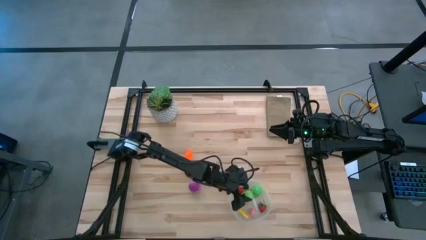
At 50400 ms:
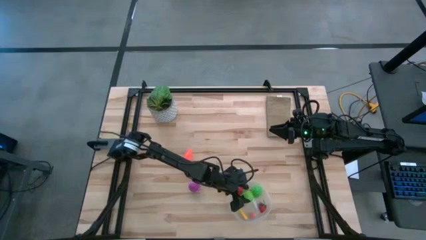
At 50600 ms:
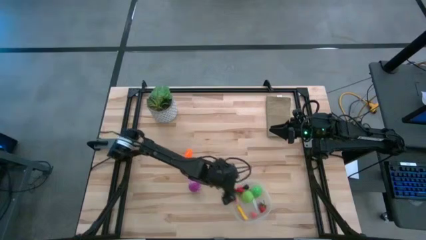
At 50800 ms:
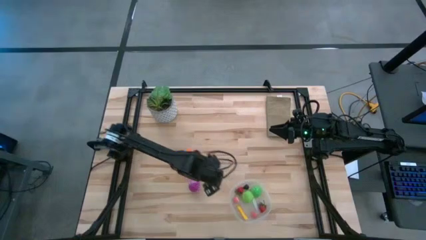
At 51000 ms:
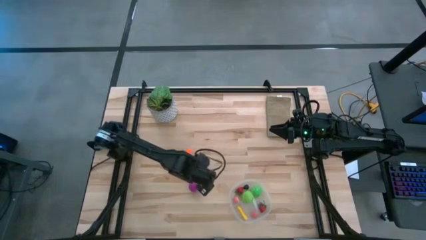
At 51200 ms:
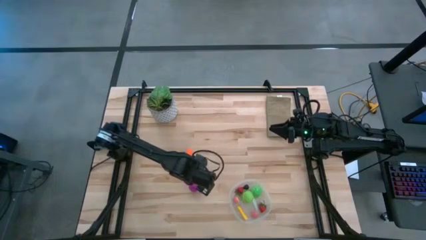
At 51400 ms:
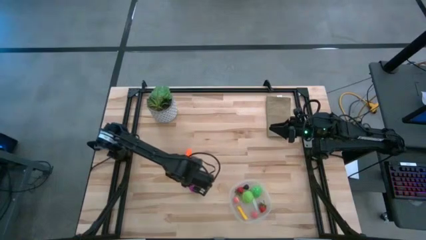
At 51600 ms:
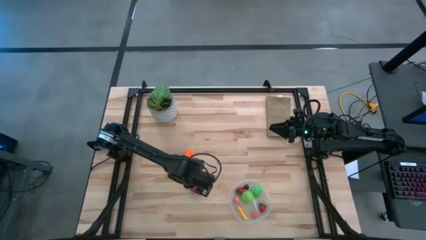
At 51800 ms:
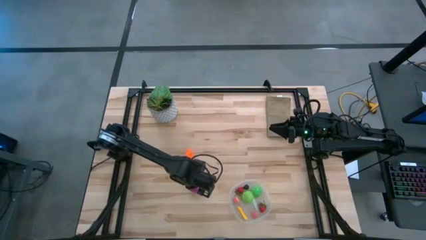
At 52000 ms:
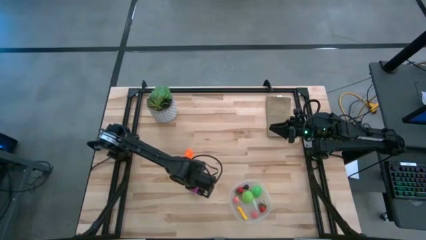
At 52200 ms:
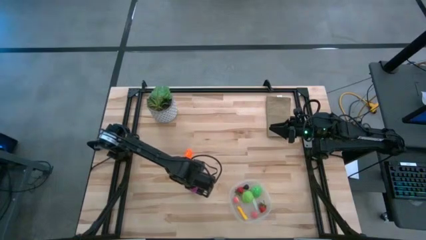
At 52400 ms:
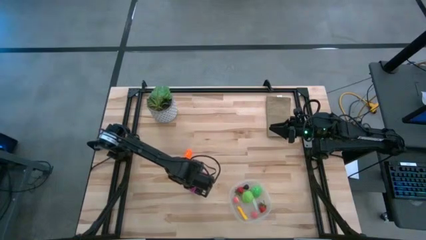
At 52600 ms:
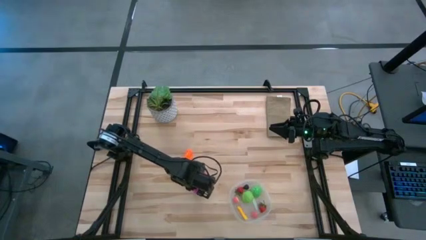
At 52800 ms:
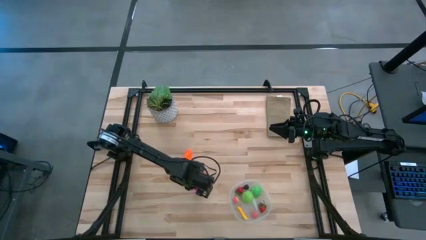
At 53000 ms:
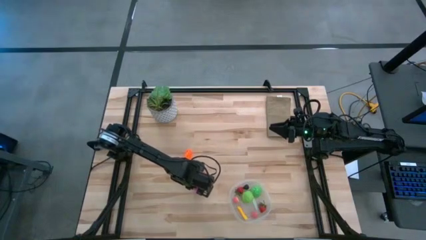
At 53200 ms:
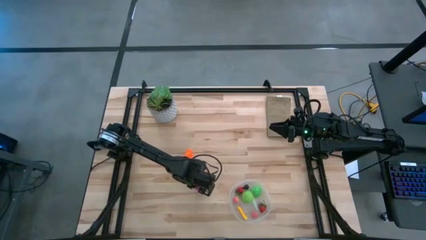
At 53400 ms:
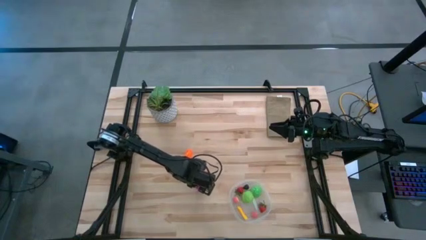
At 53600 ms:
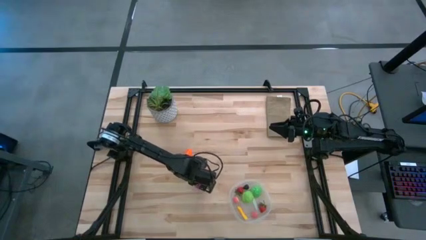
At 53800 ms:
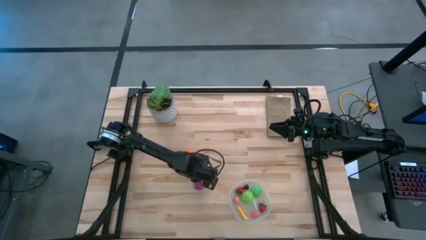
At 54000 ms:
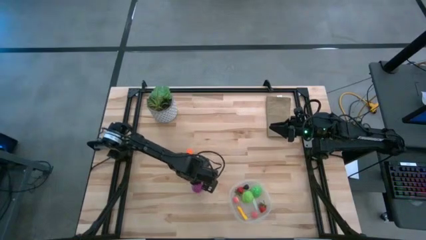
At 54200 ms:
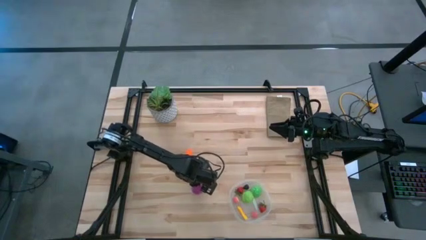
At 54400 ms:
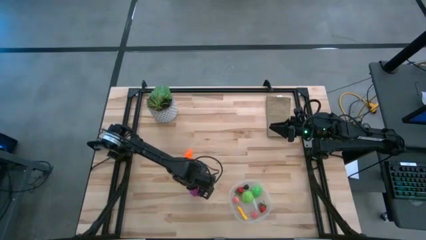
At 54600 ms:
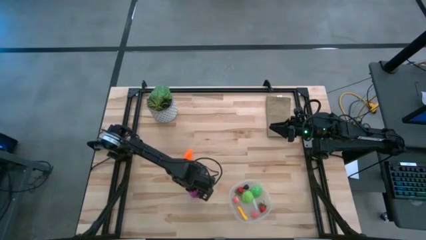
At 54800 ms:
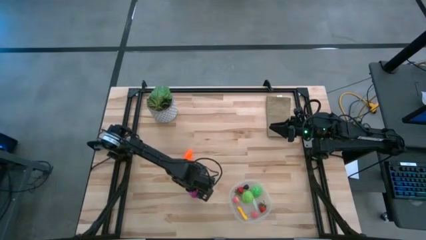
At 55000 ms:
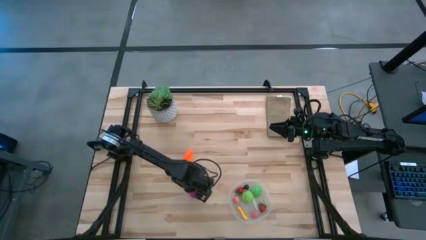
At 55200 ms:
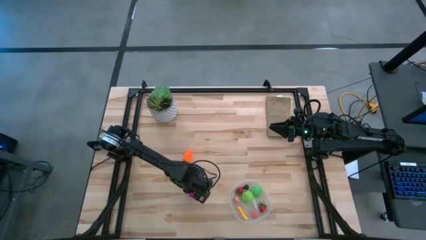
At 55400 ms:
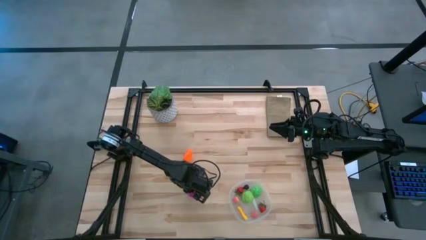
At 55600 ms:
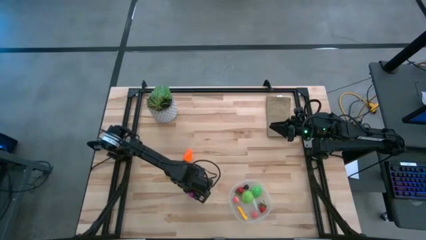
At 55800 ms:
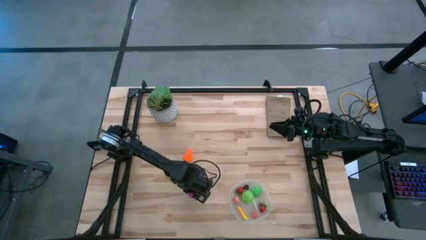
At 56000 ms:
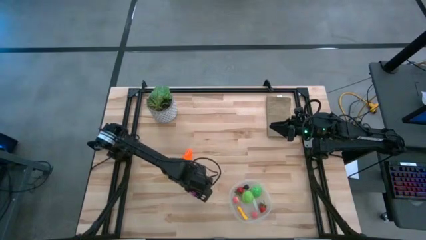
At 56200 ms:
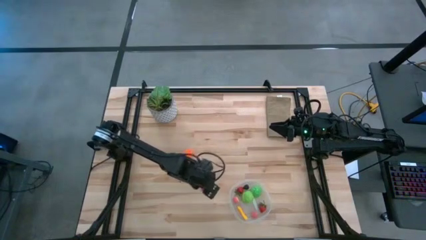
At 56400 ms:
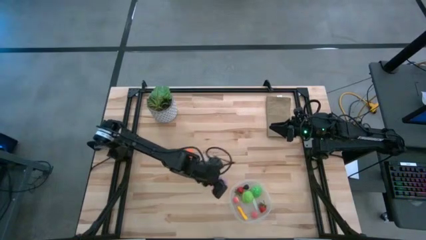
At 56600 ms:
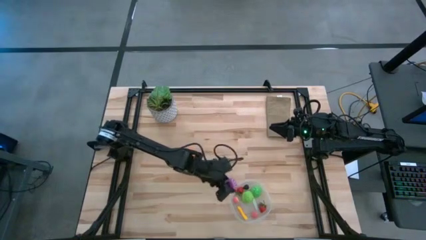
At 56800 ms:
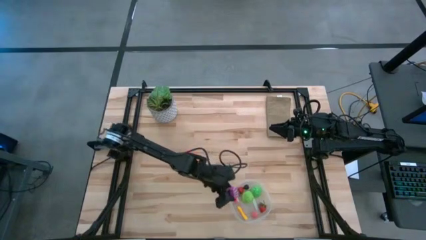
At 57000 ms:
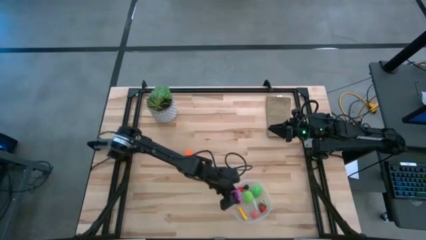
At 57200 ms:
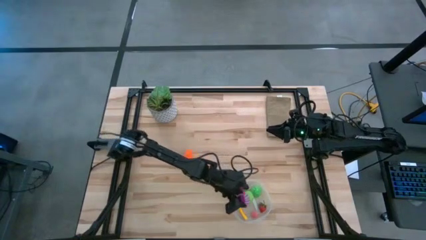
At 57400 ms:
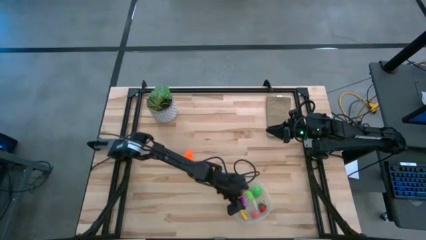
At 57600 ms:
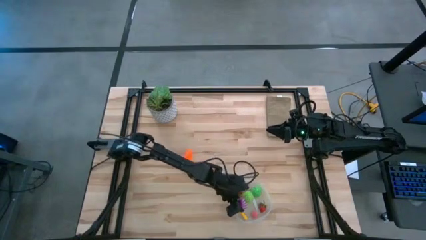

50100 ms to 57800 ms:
Task: Pick and placing Produce into tupperware
Put the onion into the transparent bin

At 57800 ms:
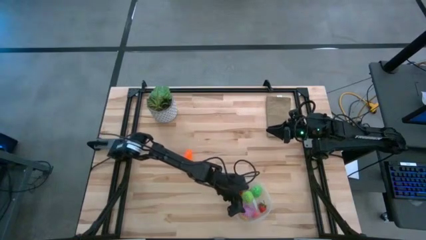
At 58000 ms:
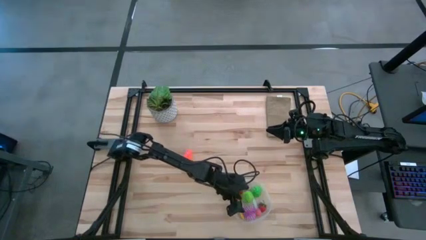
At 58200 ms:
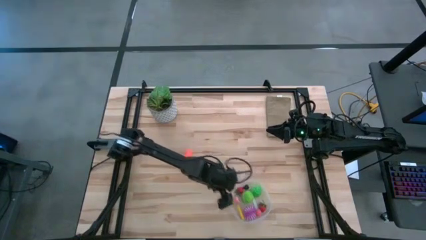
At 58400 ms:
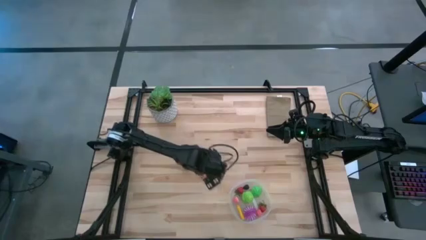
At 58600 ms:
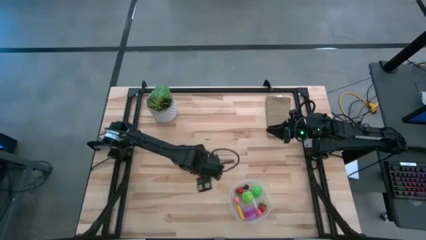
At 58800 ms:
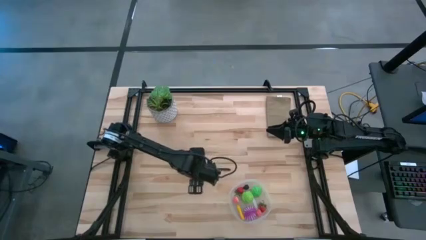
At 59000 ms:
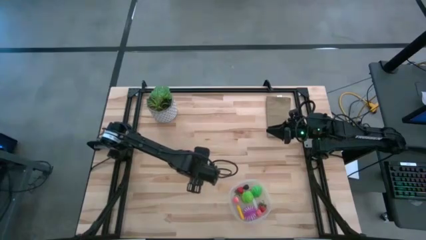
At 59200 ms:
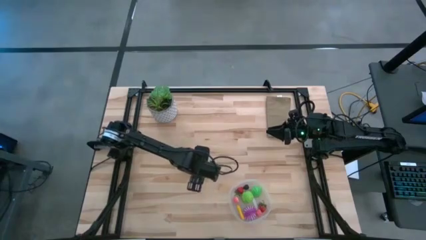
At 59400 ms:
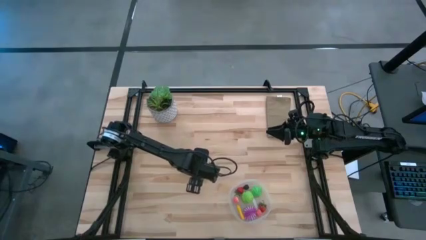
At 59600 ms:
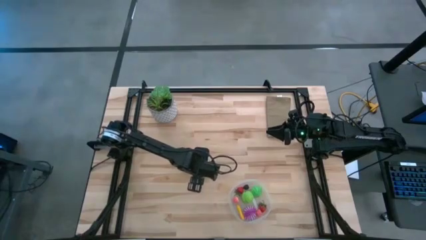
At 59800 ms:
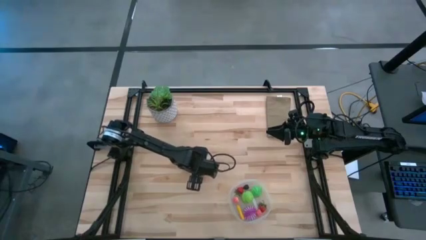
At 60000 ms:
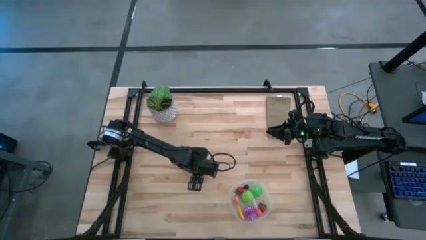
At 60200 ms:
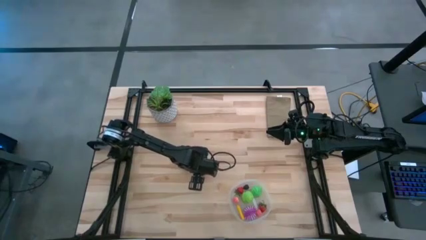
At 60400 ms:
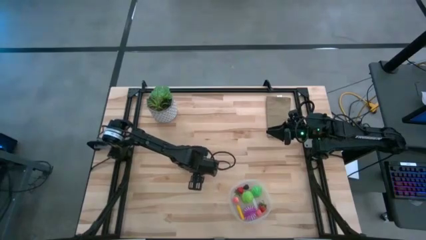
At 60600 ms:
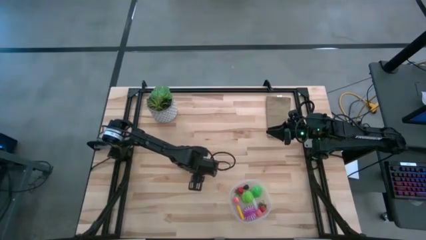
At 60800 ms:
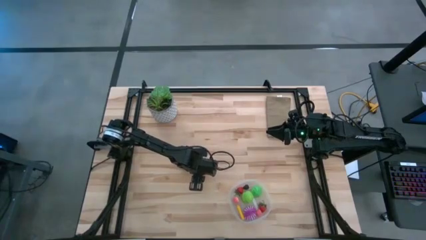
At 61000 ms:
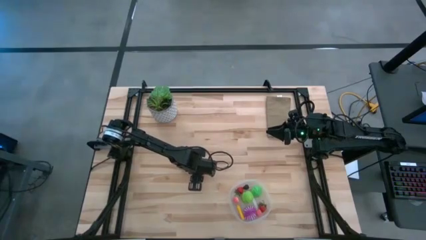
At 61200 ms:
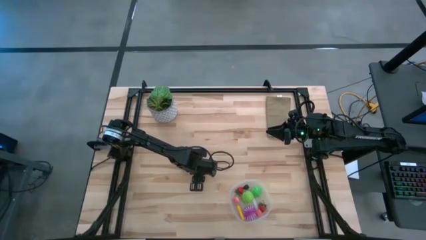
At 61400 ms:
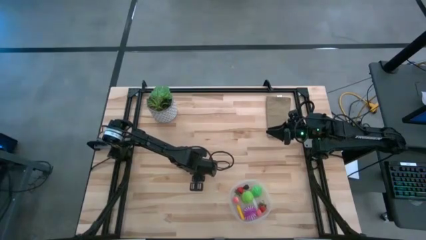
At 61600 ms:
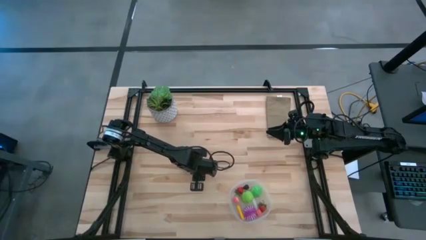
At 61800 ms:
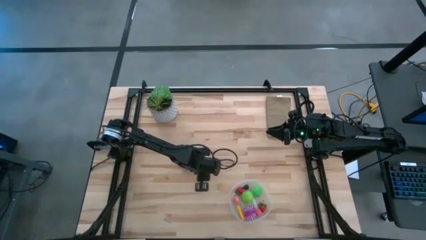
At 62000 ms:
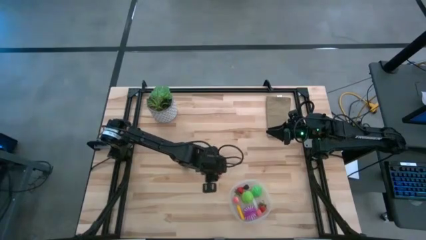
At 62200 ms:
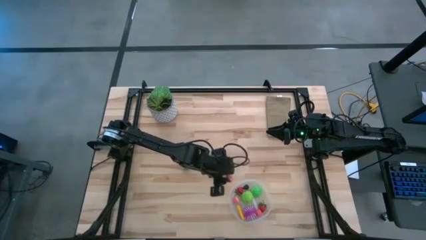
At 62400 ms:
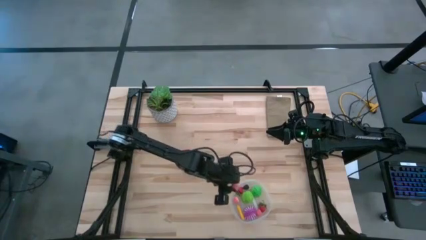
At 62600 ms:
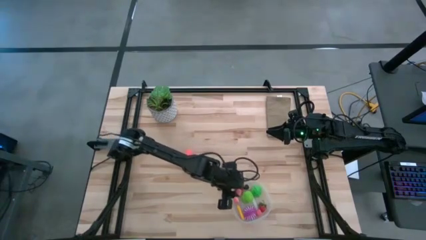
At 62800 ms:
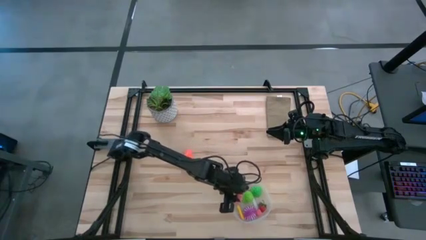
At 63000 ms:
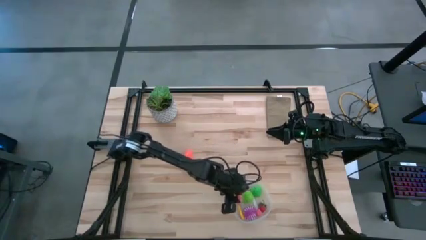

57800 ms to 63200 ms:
Put the peach into the transparent bin

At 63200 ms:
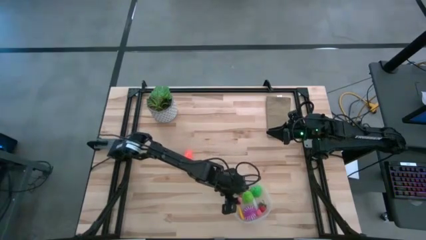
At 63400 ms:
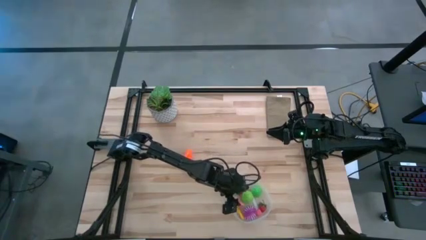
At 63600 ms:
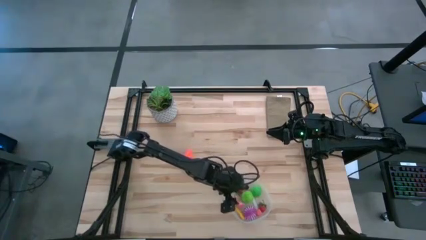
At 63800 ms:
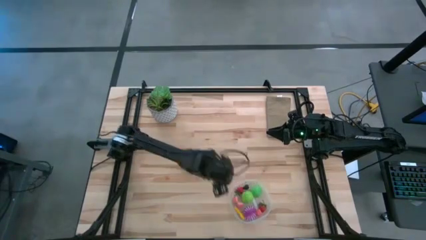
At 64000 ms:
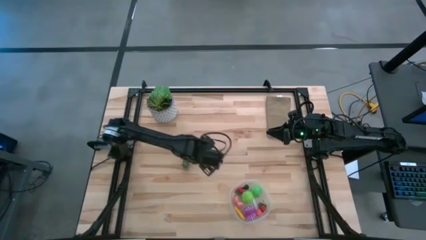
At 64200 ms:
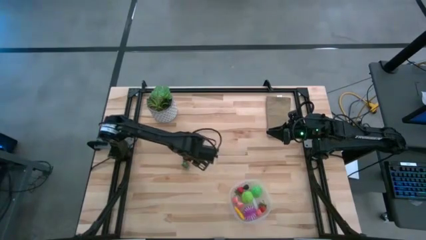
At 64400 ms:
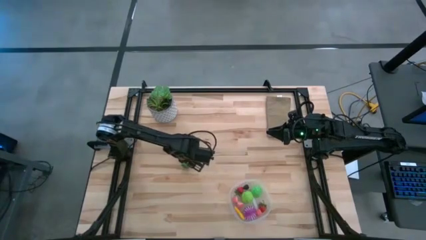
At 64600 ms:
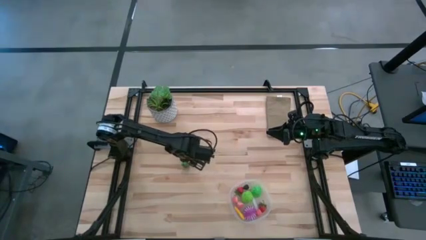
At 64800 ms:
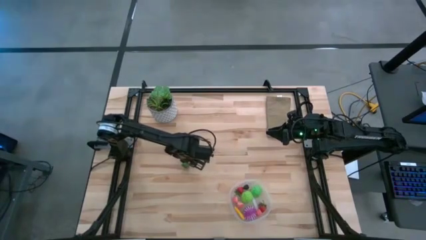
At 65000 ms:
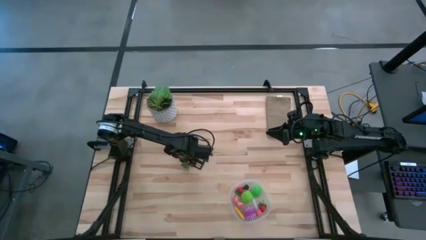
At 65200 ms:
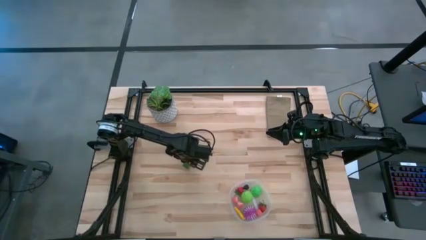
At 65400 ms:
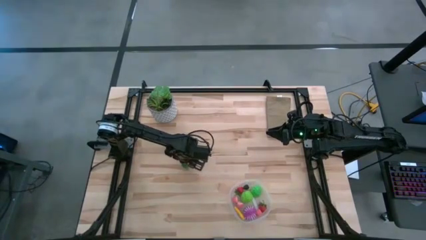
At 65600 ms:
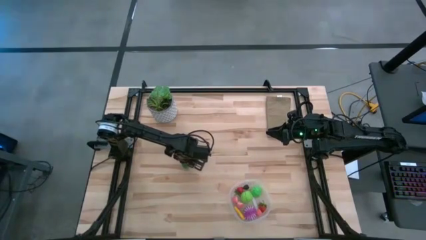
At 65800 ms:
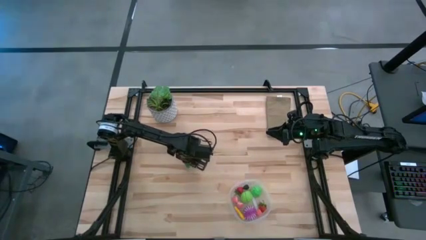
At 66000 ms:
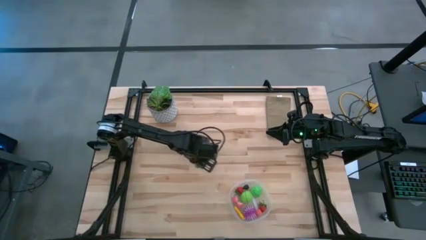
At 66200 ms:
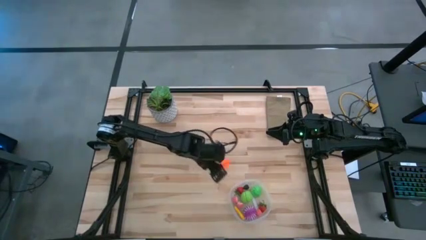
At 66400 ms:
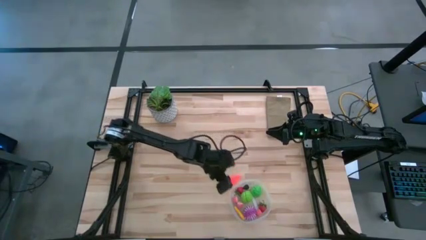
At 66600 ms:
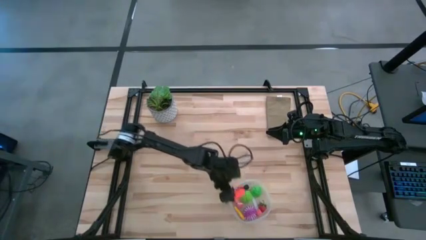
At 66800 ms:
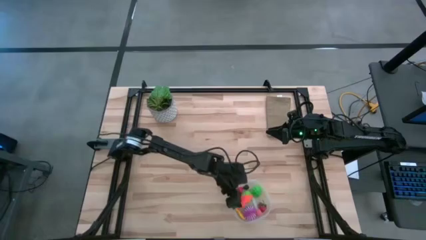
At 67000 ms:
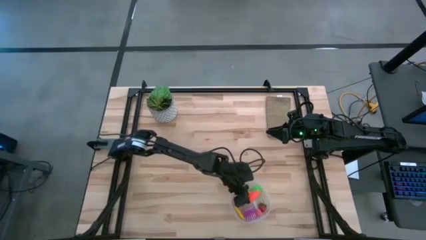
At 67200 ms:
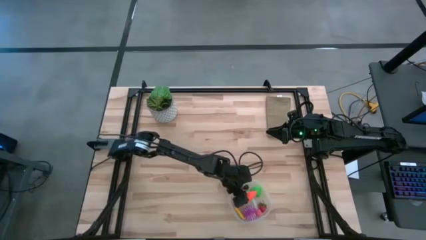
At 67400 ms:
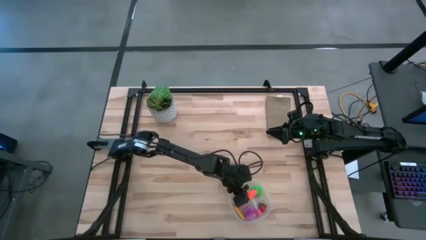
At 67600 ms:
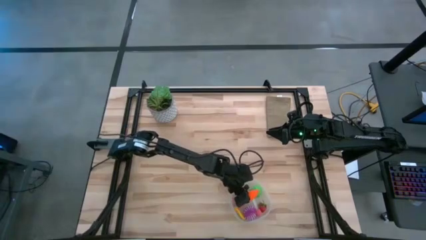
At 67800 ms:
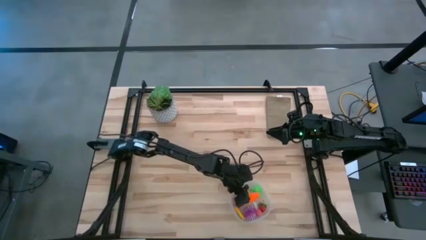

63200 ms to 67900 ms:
Put the carrot into the transparent bin
